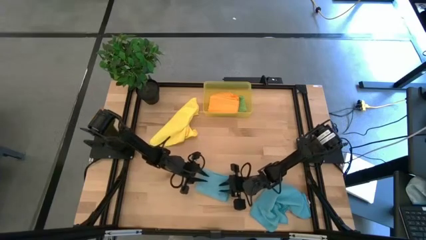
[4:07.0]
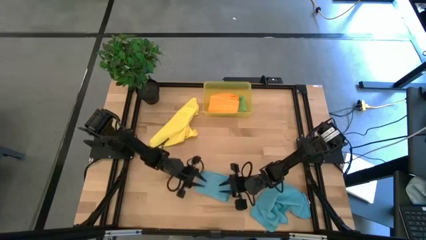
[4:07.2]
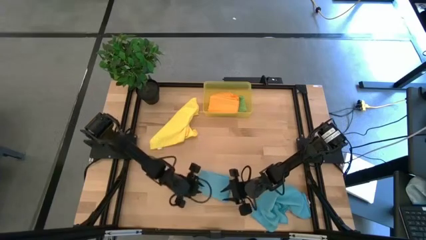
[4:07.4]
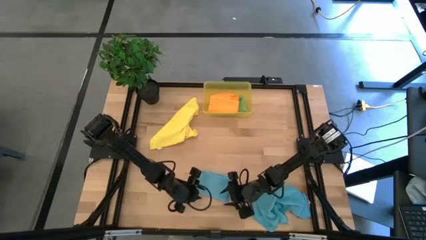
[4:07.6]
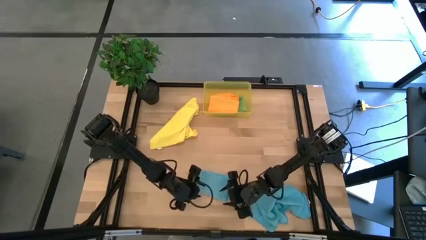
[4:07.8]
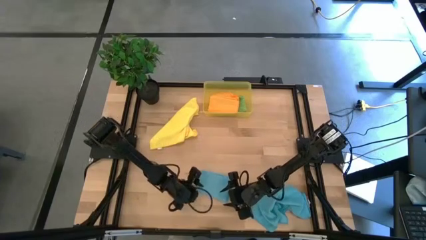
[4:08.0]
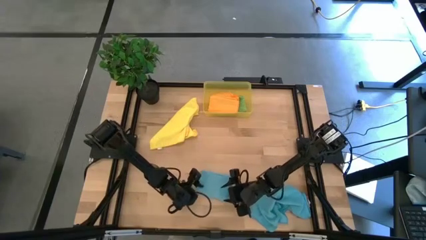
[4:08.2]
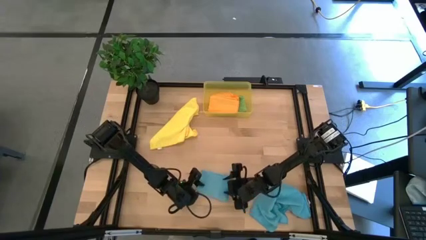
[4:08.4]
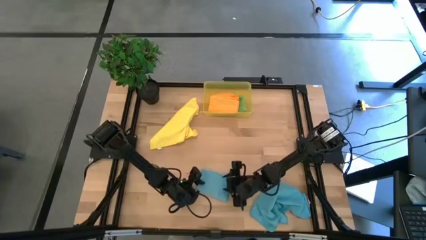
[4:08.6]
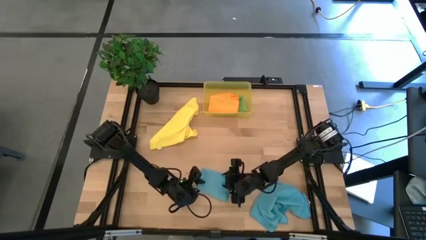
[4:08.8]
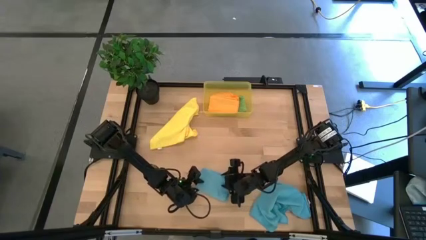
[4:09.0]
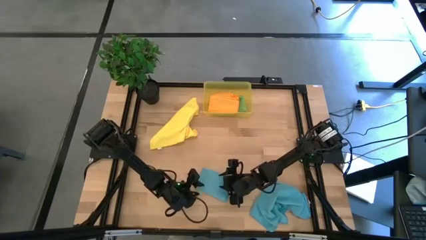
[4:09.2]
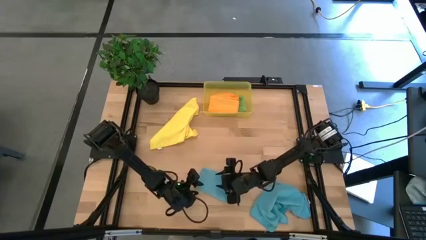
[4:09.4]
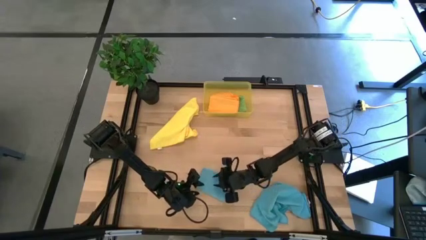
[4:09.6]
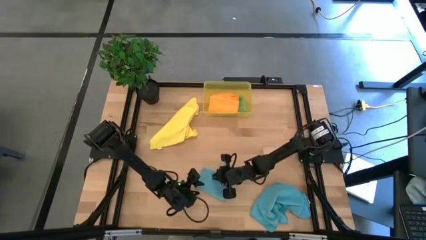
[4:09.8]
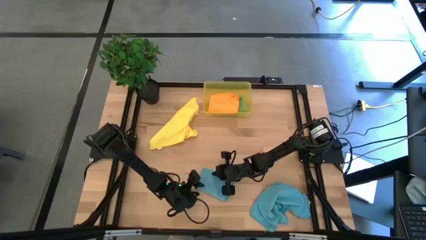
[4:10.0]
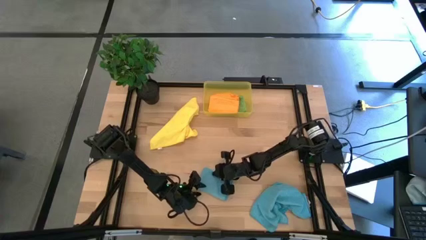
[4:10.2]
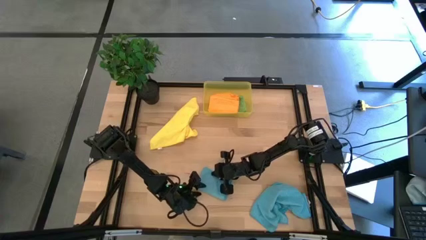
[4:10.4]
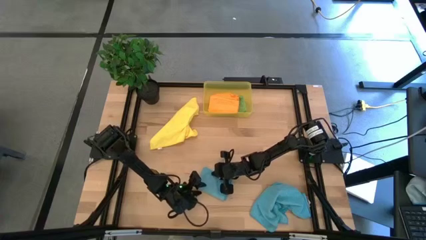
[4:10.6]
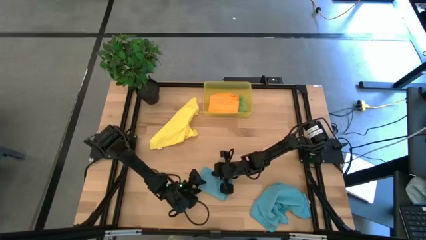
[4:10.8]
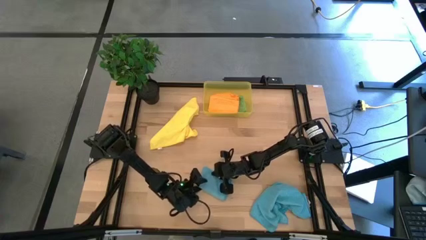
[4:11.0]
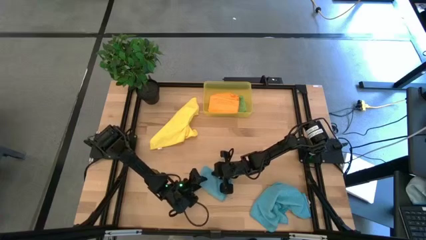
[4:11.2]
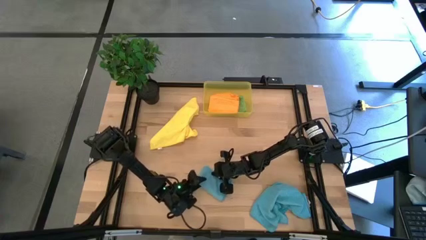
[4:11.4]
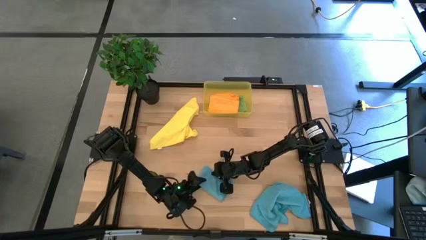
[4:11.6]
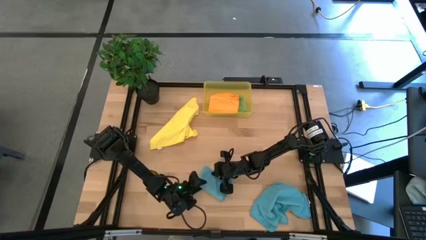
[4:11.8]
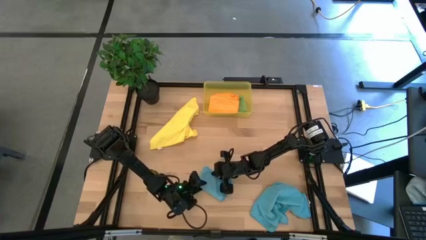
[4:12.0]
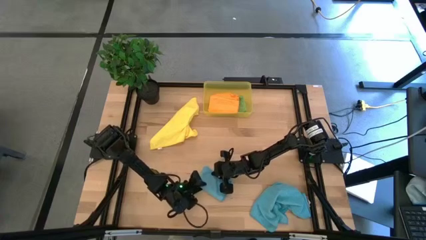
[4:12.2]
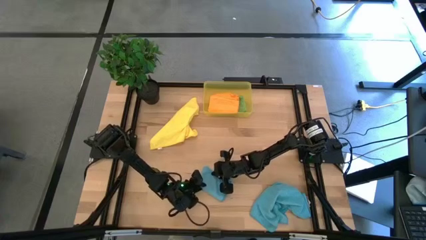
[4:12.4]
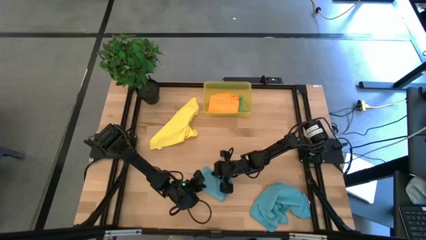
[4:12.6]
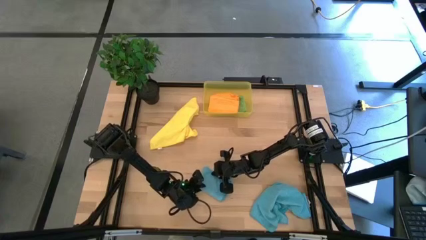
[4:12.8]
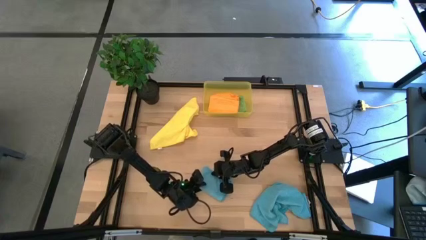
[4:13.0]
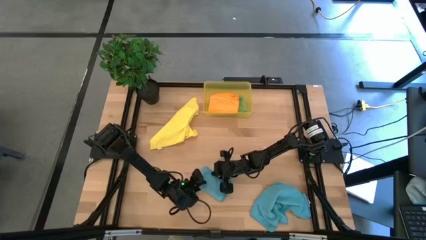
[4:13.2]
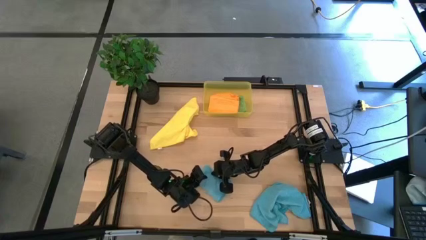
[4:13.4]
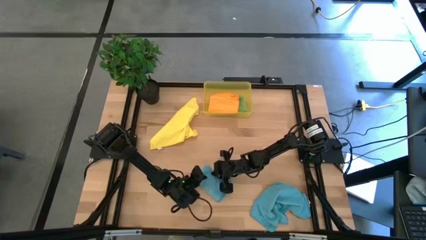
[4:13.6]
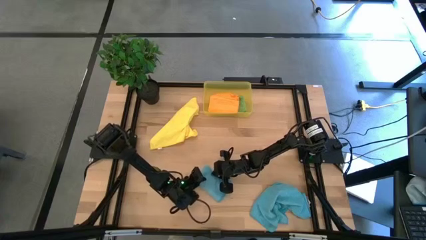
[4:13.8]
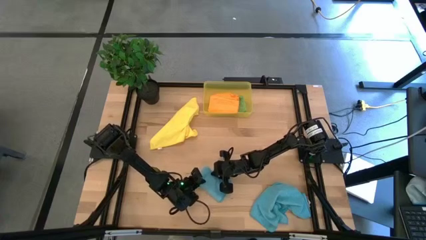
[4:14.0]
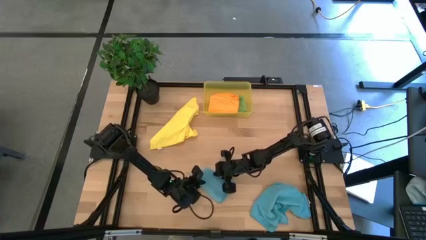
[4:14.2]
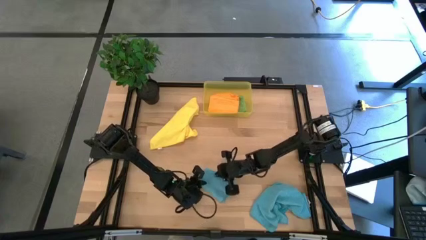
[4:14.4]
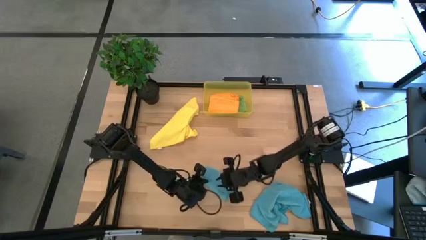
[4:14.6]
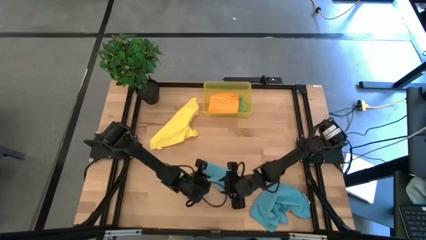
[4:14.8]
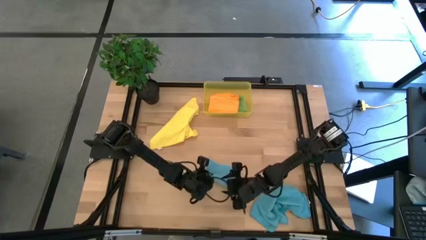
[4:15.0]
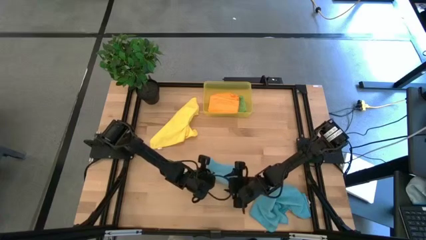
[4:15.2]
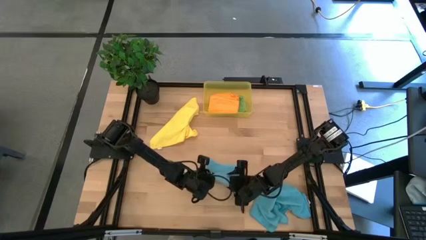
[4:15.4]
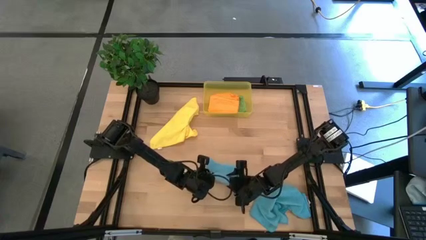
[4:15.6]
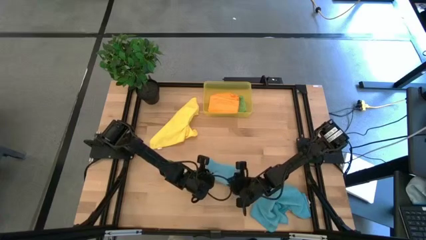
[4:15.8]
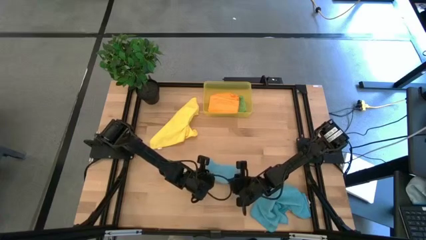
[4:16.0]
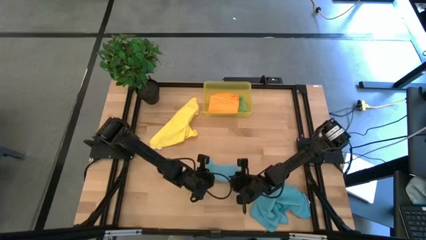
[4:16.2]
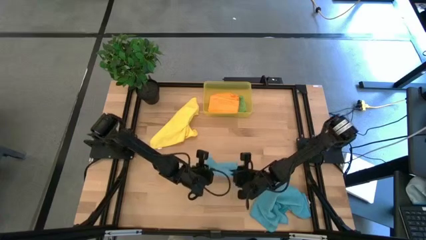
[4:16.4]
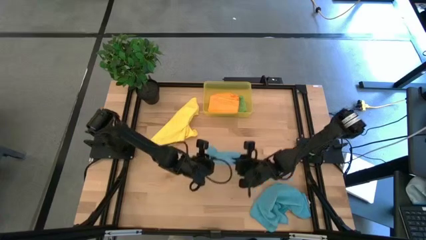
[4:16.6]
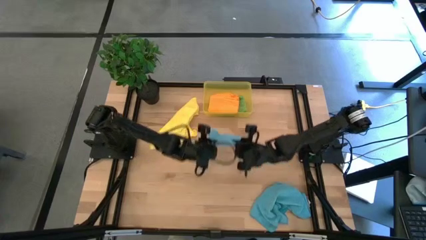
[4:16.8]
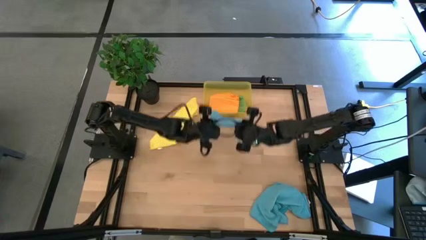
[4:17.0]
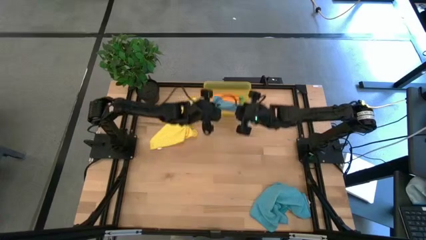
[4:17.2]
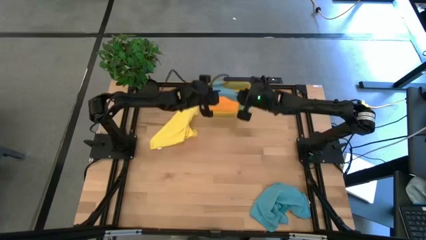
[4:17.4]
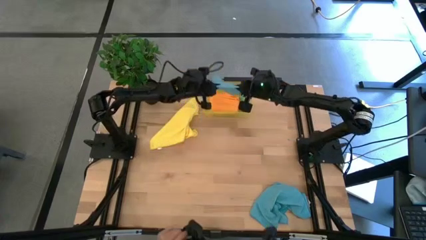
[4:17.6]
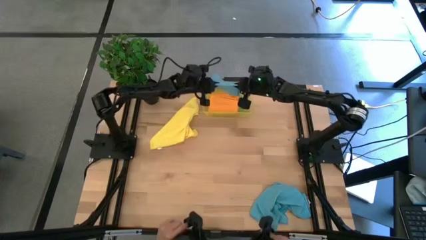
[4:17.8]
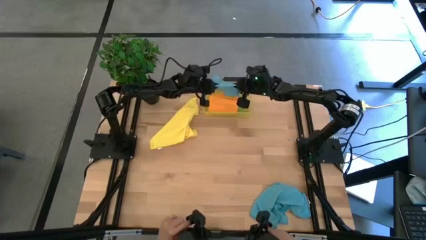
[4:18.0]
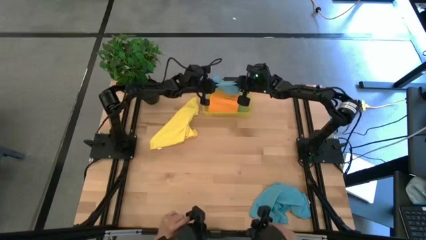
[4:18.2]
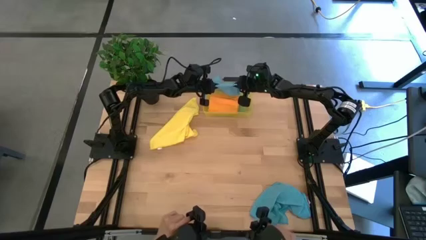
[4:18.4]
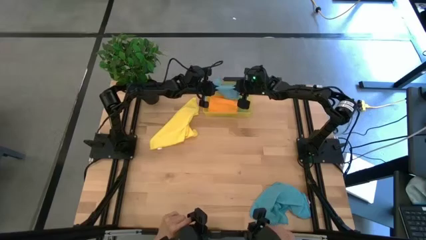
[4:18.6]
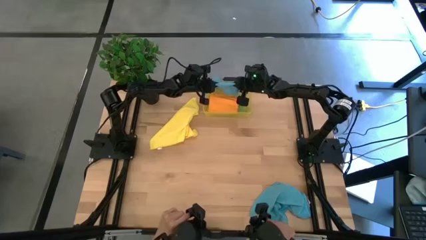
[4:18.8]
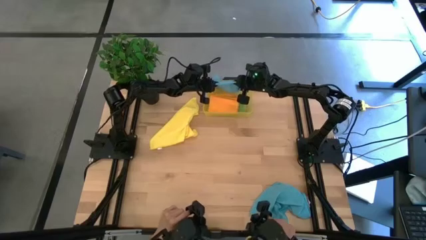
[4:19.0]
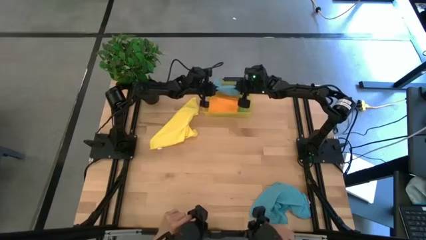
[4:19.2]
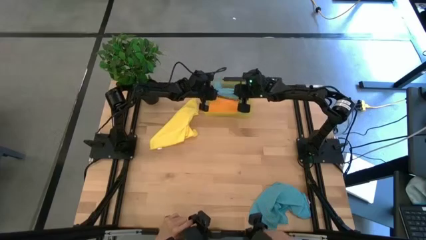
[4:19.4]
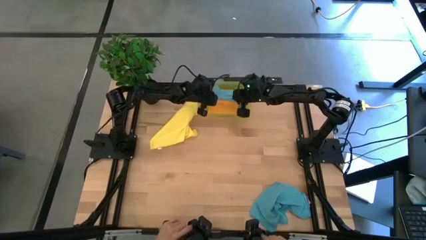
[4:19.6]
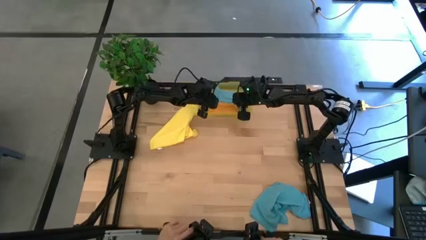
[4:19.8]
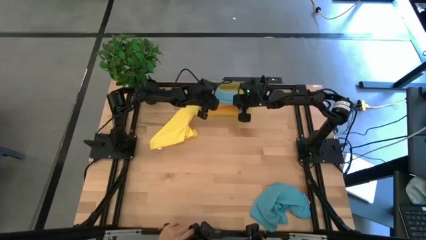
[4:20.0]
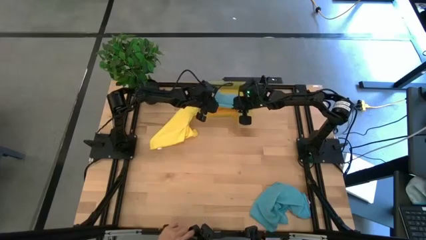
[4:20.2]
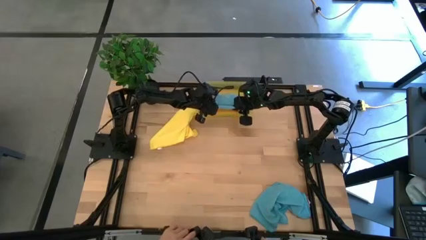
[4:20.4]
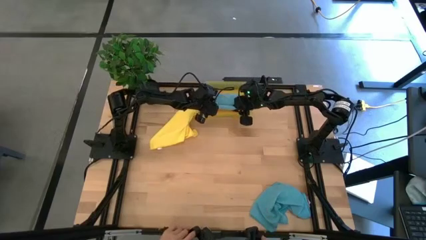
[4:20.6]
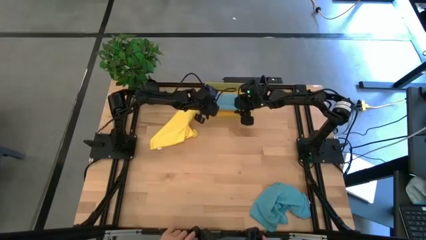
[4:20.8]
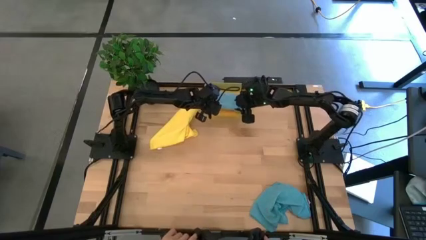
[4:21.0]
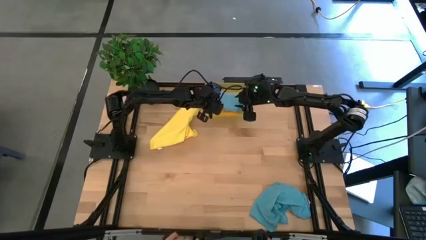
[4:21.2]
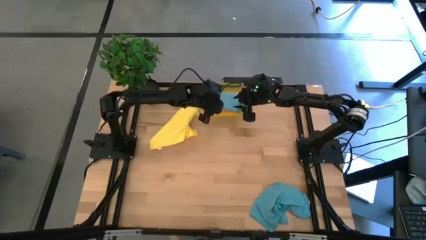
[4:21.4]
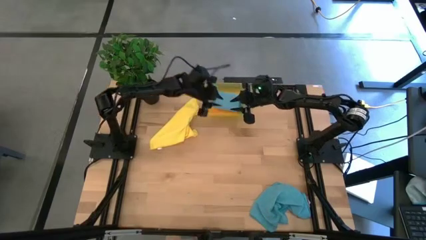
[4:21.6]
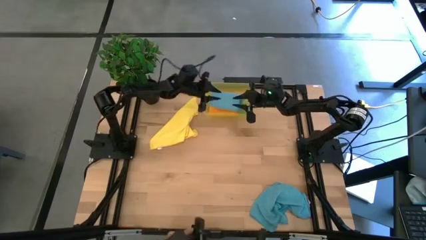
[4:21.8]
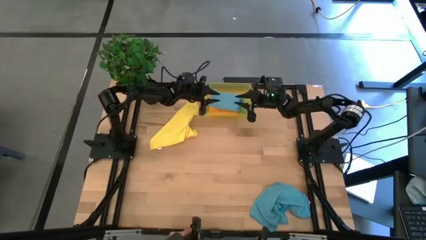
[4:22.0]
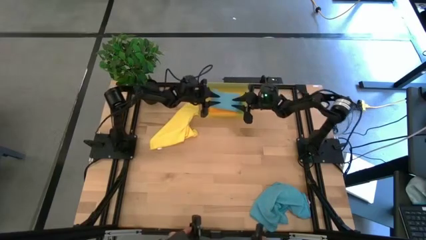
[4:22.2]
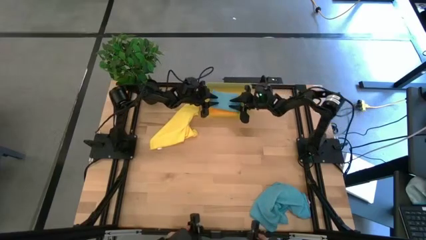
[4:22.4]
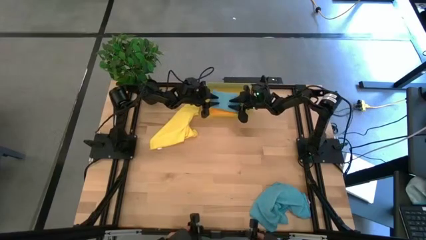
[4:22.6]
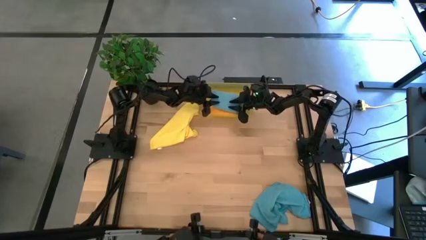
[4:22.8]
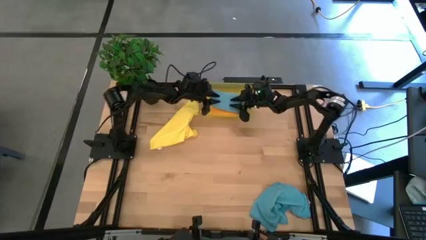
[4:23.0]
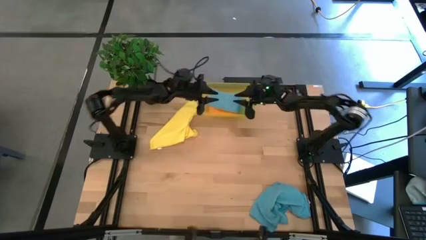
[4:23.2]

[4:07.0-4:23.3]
Task: Fold microfiber towels
Stack the folded top blue microfiber cloth on the top of the orange microfiber cloth
